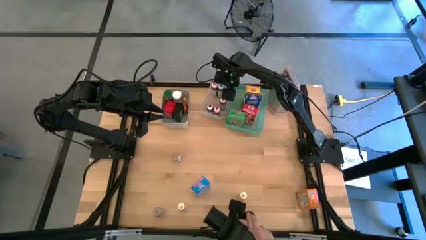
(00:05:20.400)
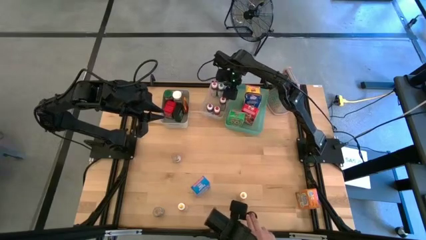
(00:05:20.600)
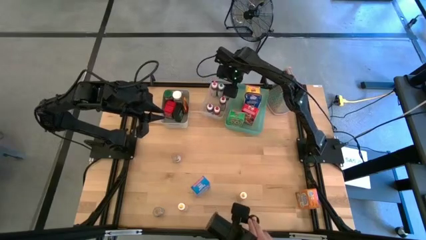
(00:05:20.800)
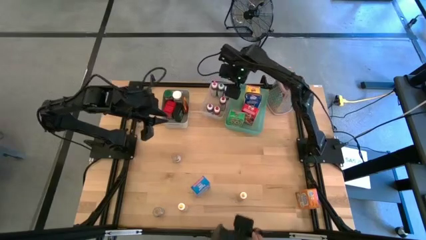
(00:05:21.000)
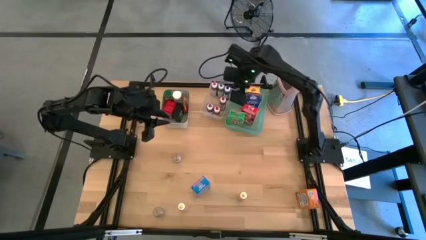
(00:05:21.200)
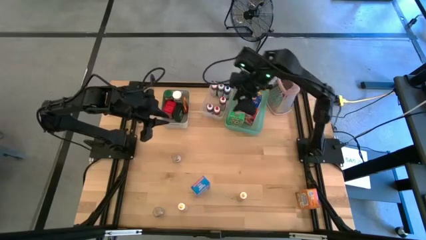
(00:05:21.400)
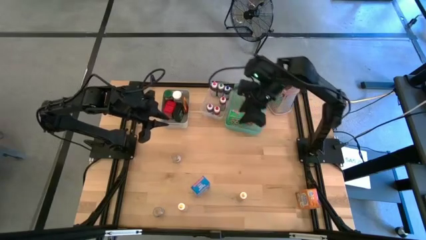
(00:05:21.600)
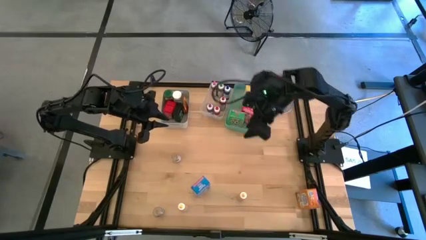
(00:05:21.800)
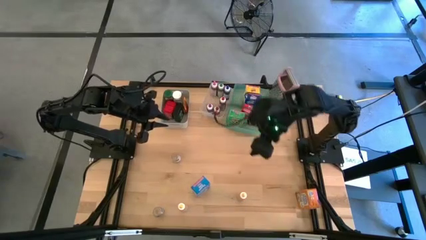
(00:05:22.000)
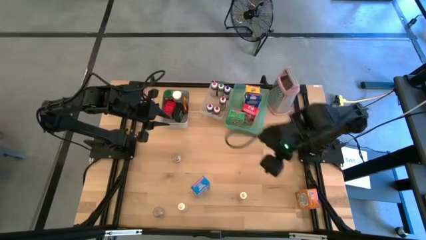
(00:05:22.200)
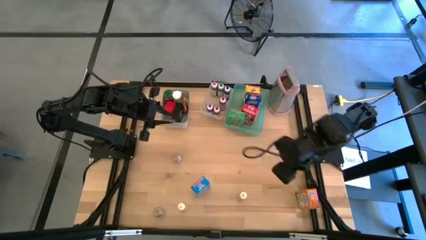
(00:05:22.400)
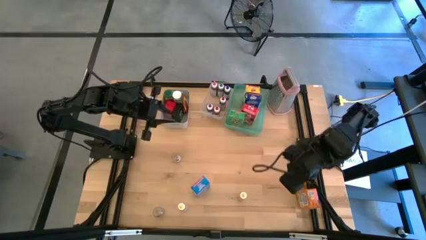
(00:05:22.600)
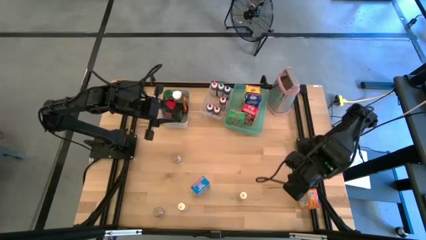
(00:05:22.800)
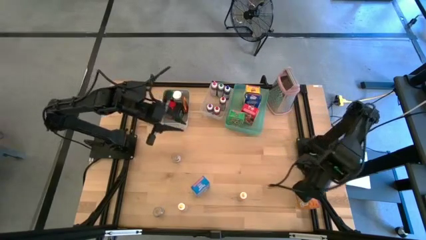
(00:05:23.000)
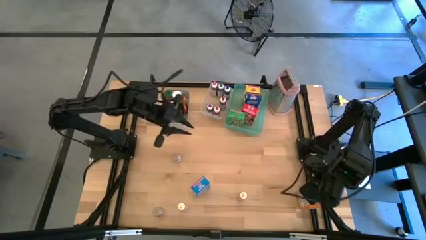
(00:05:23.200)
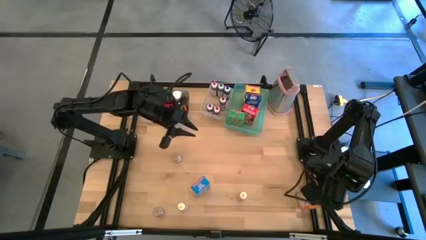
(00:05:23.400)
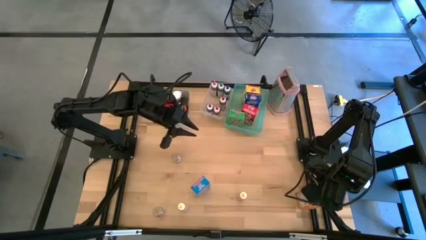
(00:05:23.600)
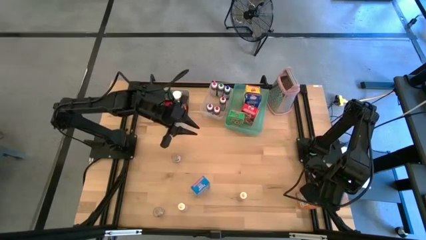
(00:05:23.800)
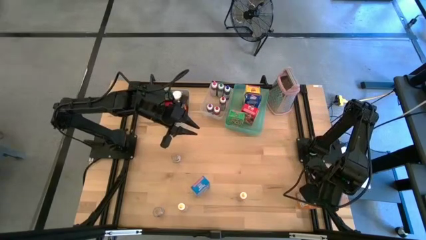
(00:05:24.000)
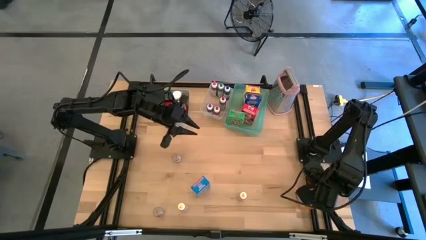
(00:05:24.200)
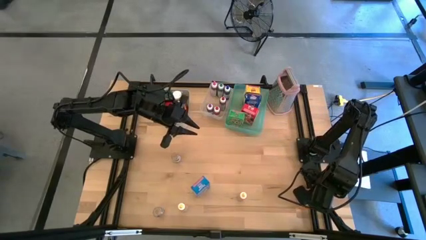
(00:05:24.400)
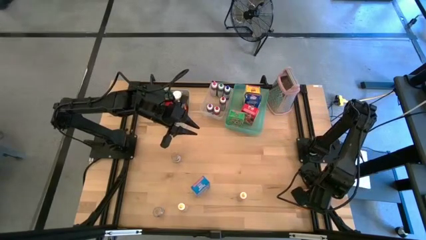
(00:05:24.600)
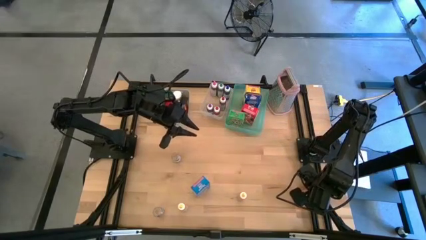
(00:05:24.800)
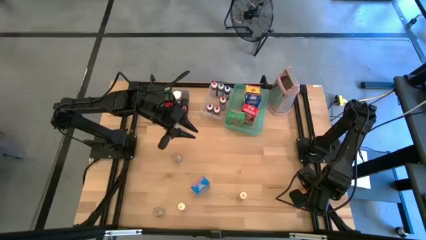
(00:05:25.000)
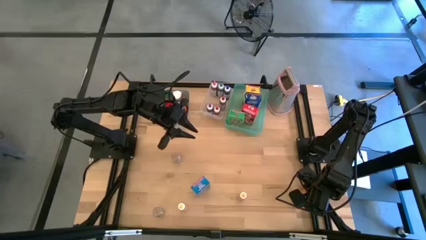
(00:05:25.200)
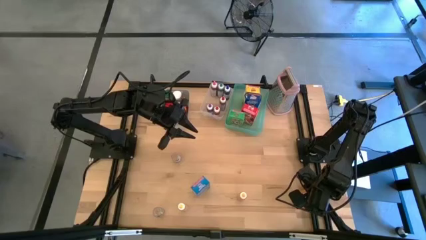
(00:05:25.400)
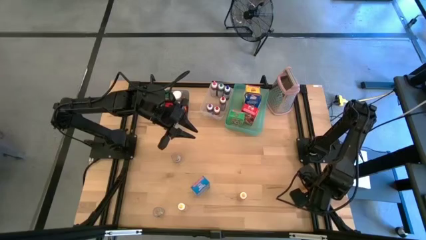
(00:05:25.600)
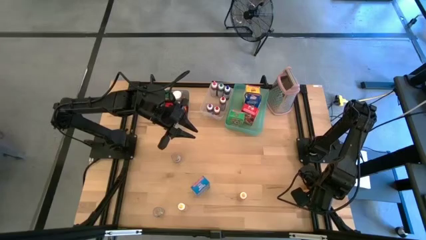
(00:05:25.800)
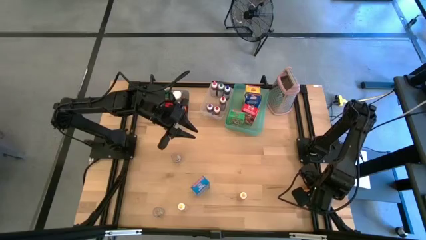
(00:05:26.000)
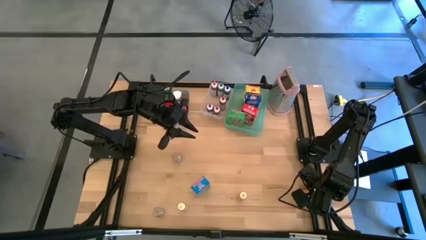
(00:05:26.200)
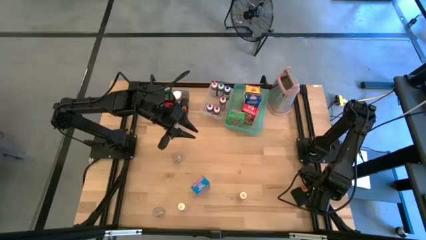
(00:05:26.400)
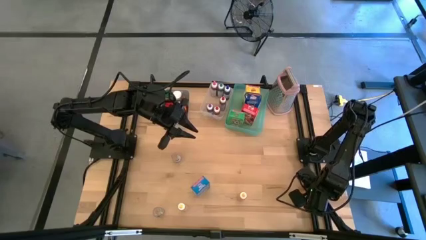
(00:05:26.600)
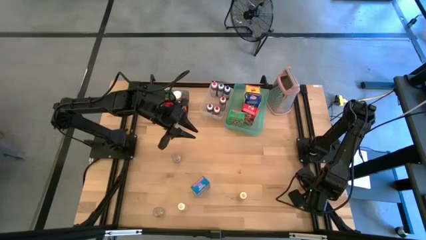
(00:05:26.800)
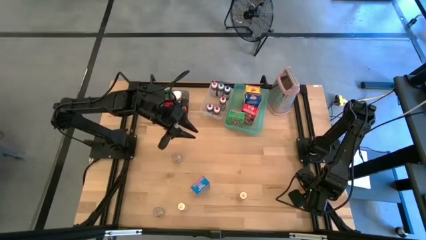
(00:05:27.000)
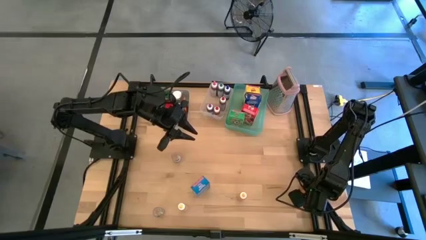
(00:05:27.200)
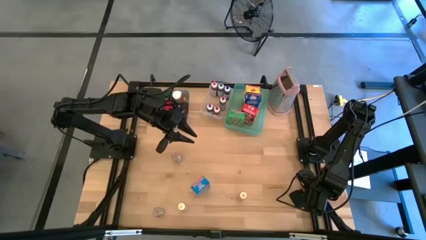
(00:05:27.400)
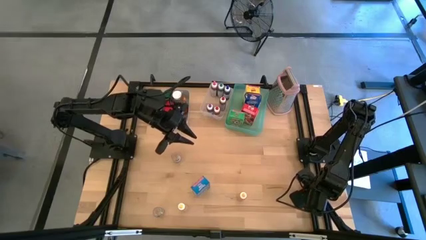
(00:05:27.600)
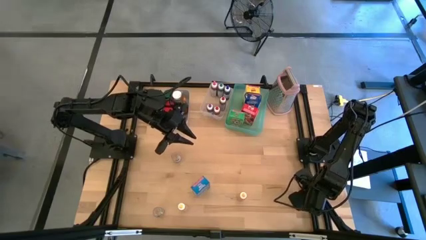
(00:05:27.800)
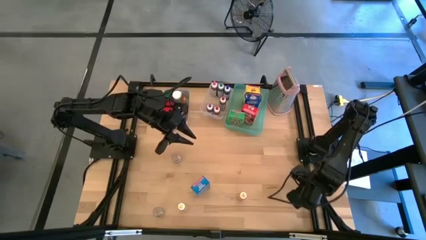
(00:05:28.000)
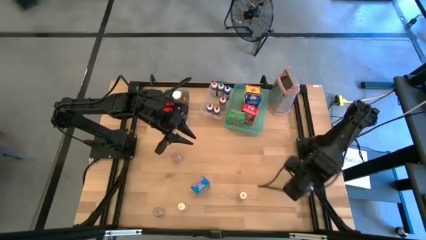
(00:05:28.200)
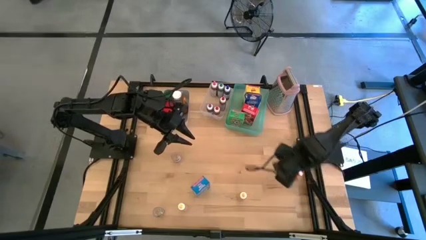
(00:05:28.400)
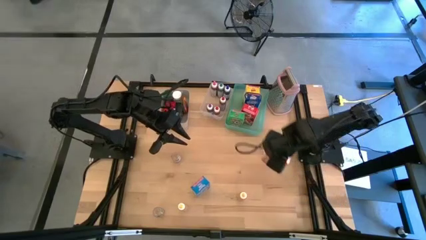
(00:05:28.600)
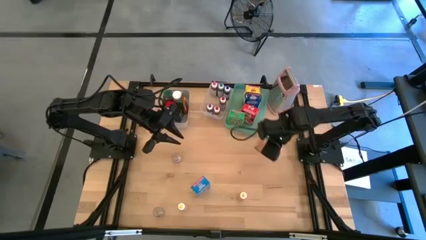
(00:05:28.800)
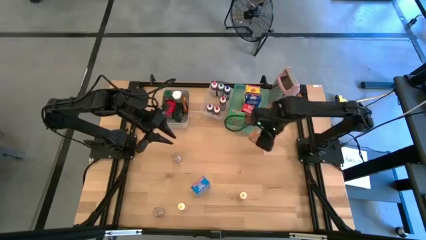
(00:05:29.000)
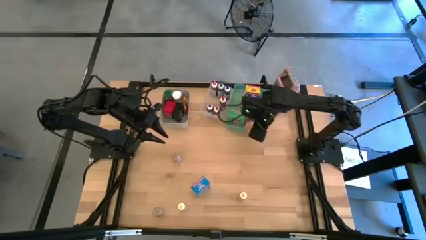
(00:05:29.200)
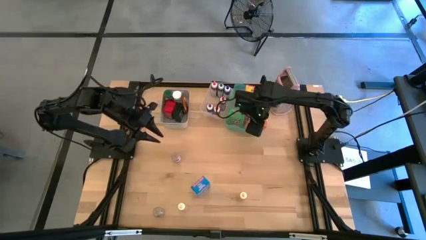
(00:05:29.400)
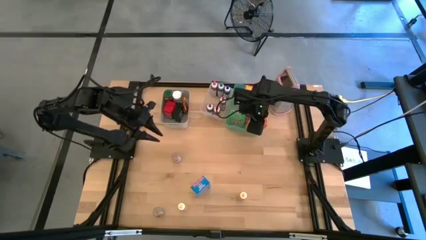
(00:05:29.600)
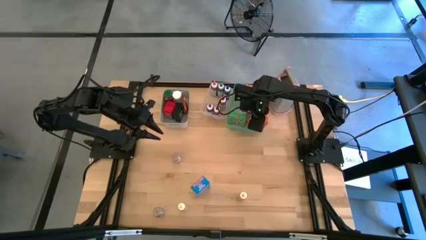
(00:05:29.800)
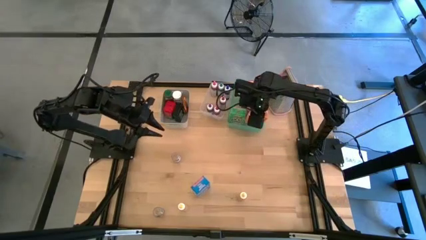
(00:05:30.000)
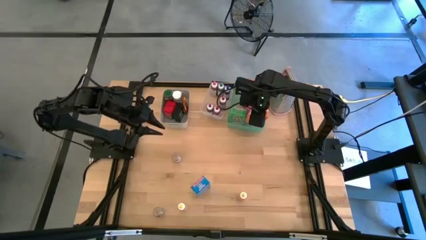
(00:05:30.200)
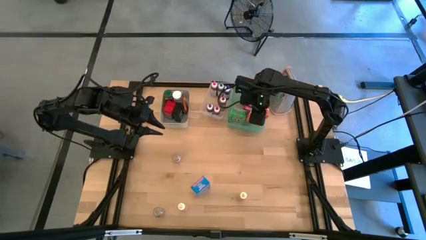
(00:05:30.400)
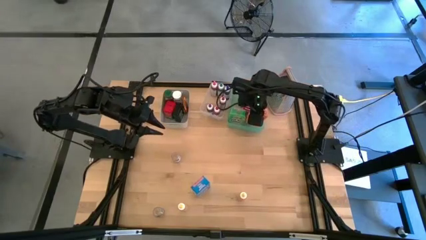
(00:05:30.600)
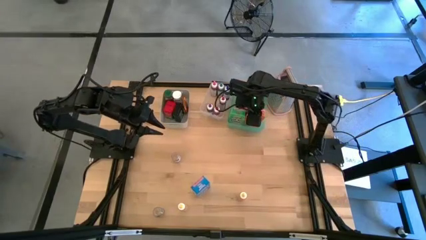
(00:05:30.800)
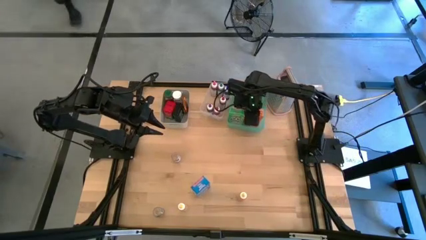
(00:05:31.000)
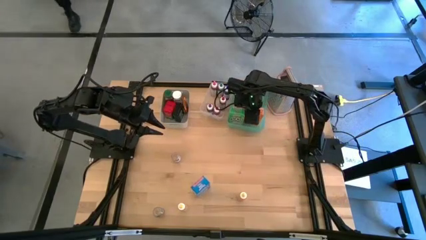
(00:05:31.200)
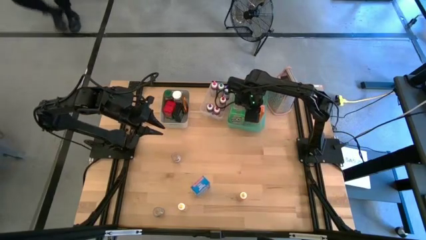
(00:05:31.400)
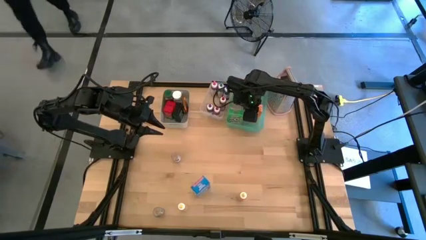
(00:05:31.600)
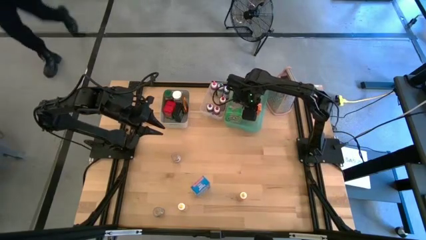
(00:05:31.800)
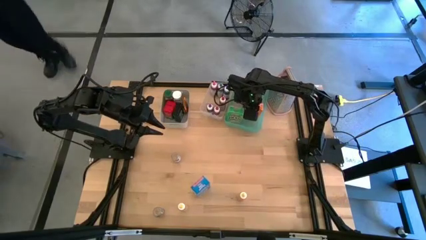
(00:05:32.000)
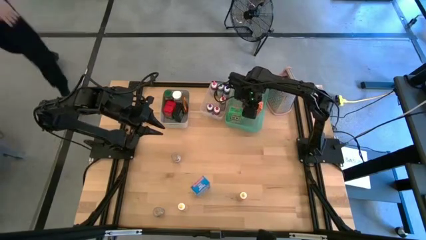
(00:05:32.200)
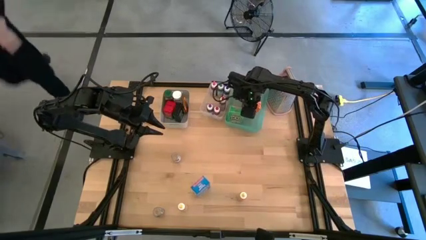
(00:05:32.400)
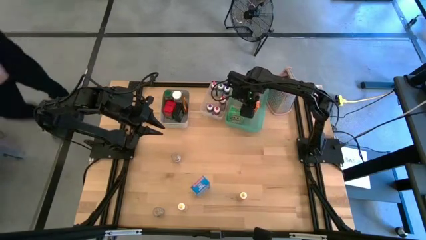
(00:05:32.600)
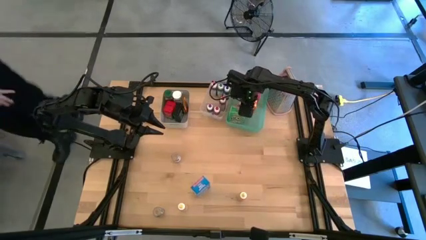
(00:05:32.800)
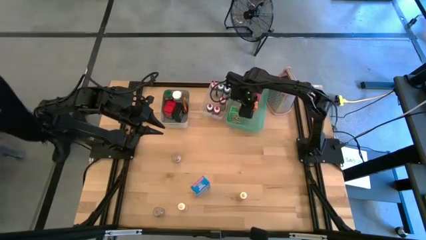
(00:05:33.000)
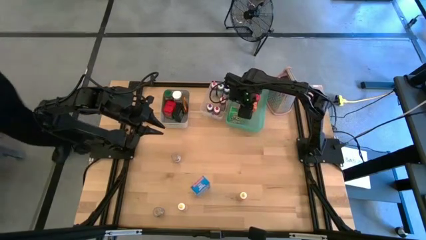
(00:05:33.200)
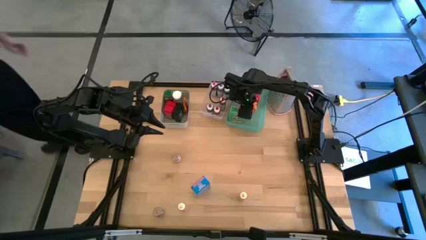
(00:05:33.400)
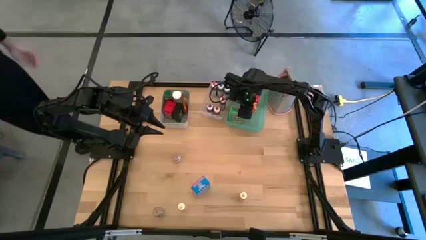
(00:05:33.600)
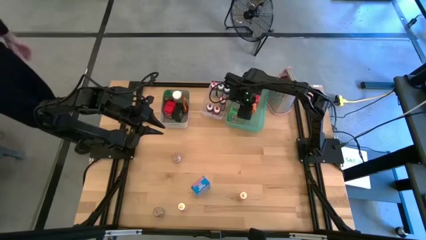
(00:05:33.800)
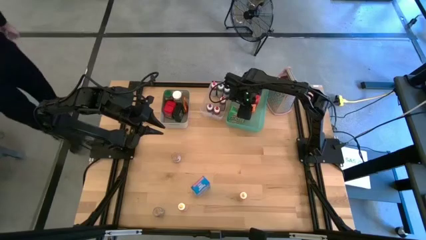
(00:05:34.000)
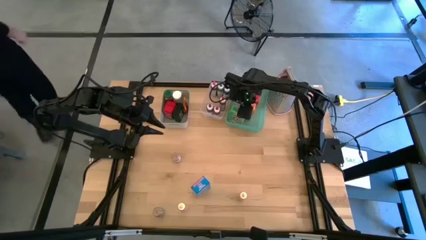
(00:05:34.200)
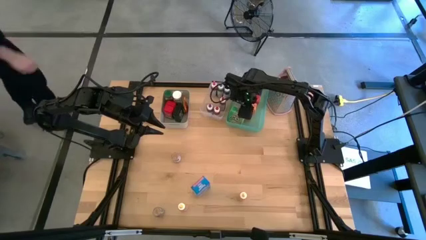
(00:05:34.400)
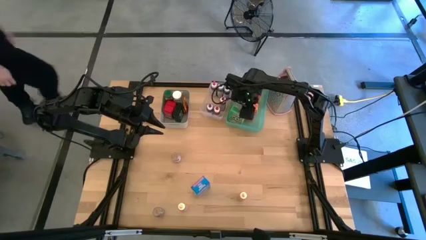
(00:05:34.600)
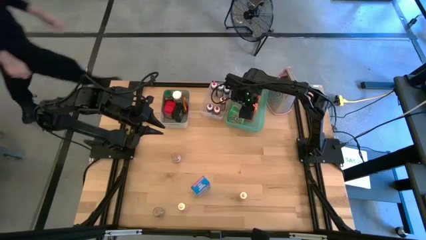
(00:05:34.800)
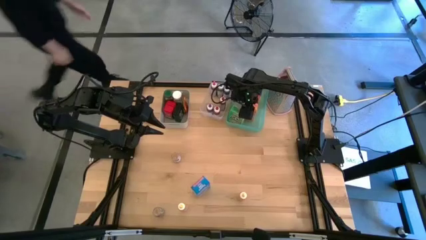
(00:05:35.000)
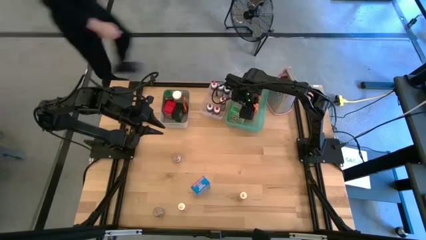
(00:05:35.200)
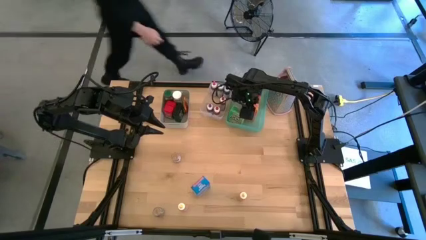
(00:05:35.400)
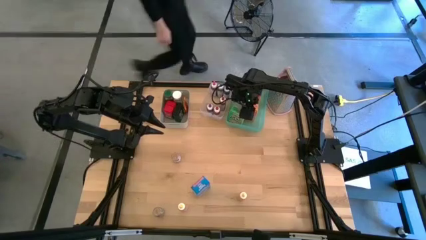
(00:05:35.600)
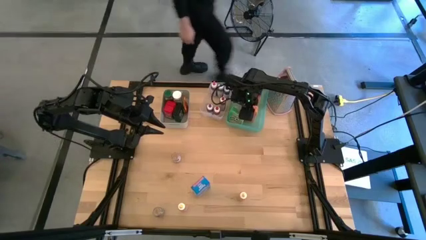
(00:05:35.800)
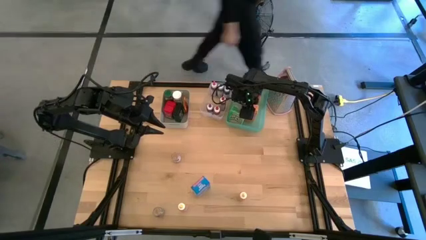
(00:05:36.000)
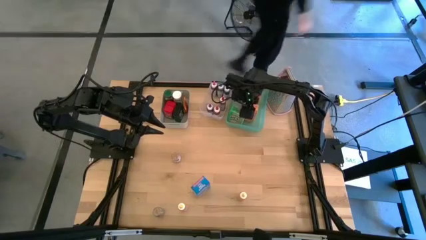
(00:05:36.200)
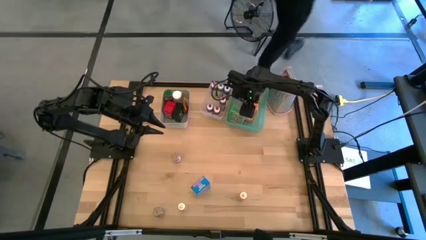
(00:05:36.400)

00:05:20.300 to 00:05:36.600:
Task: Pick & Place Kitchen Items
Put the orange cereal box into the green bin
